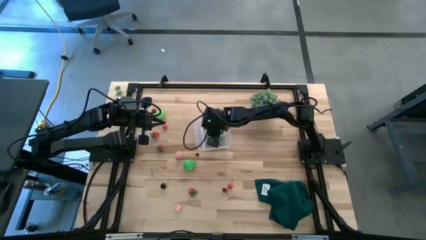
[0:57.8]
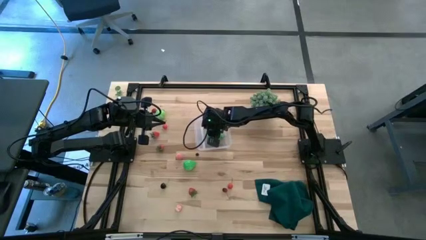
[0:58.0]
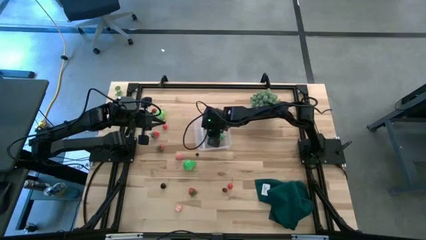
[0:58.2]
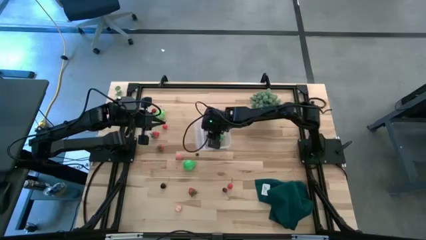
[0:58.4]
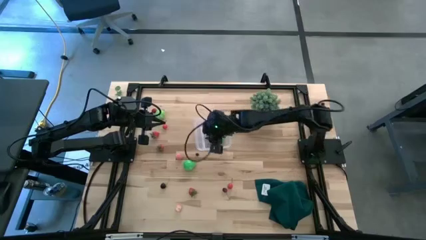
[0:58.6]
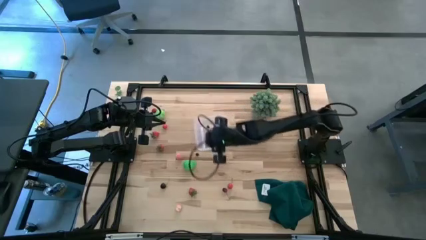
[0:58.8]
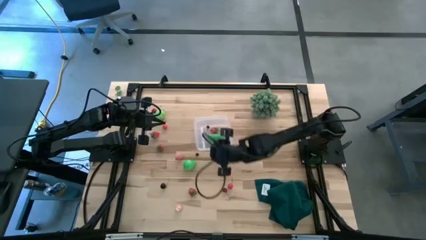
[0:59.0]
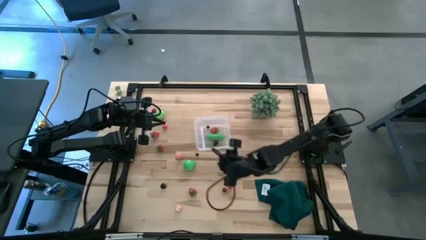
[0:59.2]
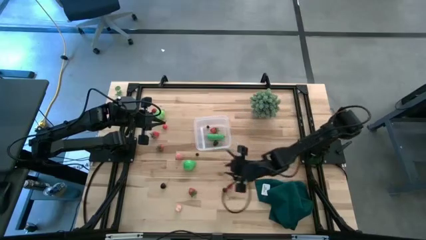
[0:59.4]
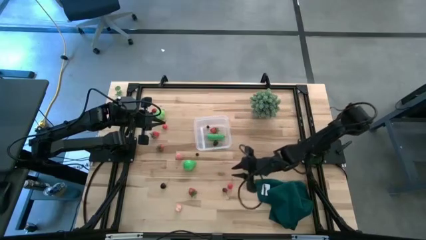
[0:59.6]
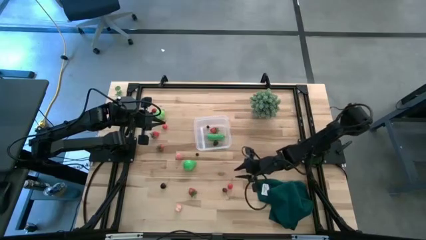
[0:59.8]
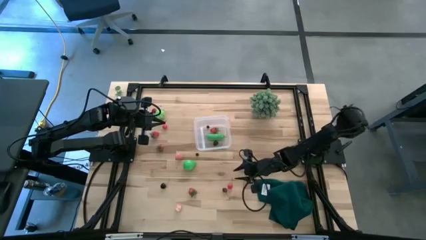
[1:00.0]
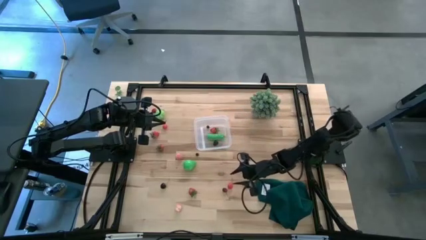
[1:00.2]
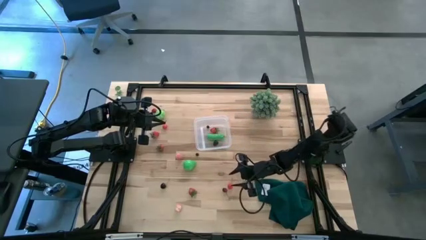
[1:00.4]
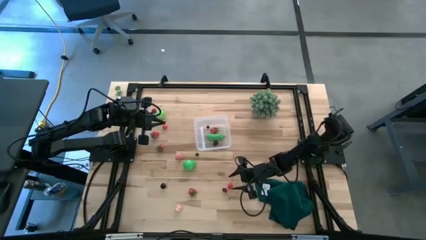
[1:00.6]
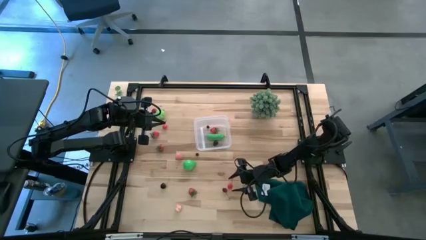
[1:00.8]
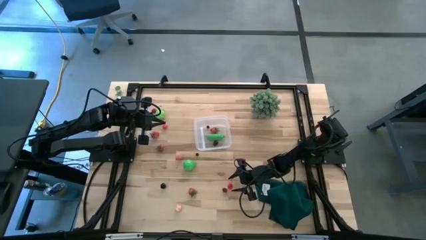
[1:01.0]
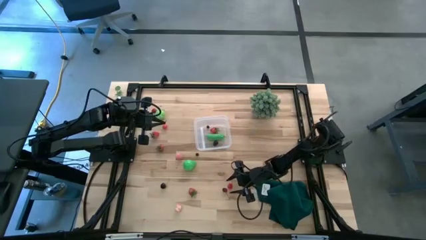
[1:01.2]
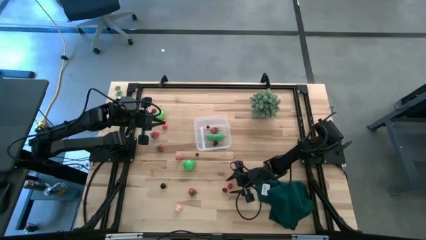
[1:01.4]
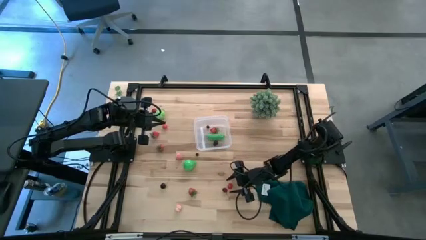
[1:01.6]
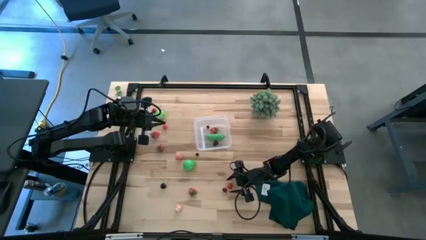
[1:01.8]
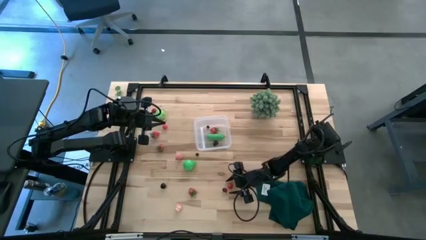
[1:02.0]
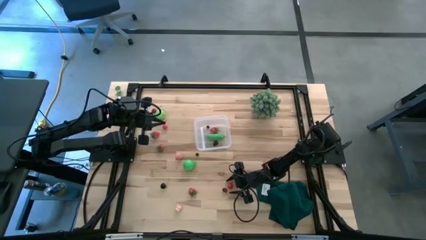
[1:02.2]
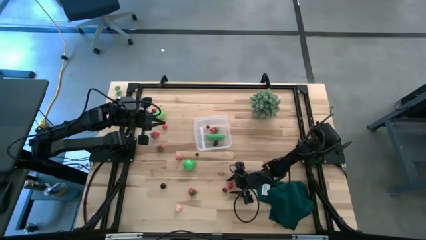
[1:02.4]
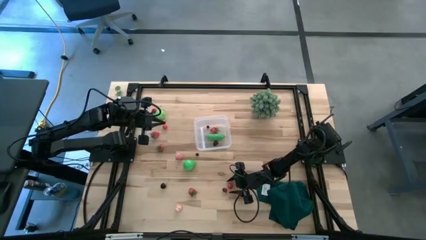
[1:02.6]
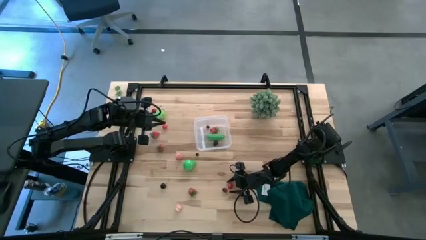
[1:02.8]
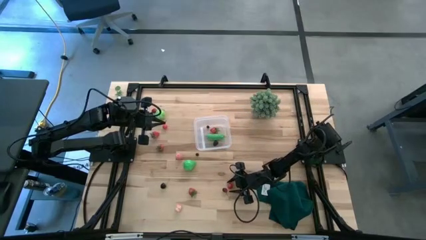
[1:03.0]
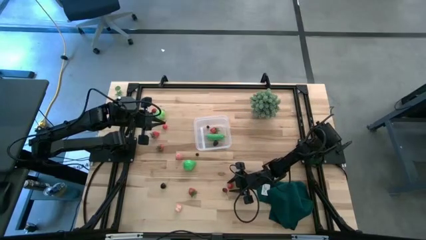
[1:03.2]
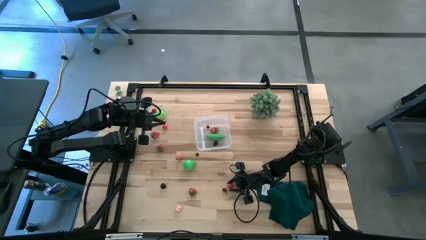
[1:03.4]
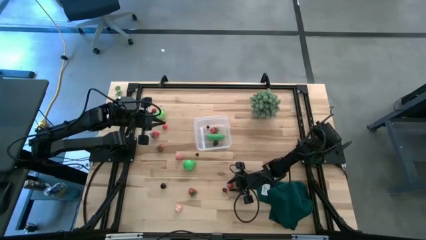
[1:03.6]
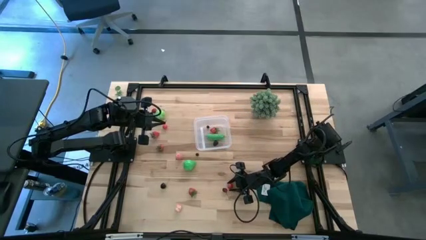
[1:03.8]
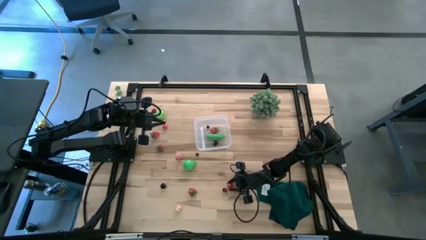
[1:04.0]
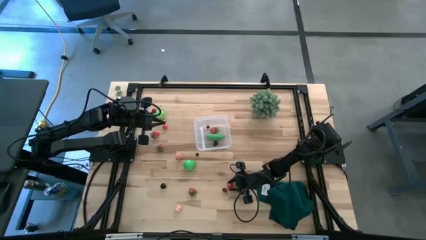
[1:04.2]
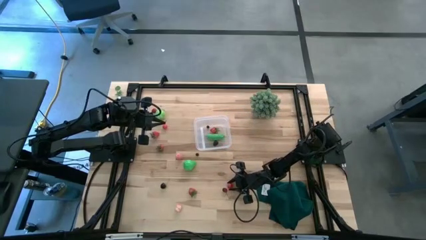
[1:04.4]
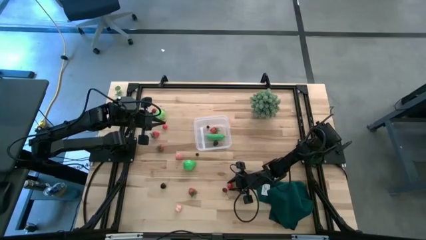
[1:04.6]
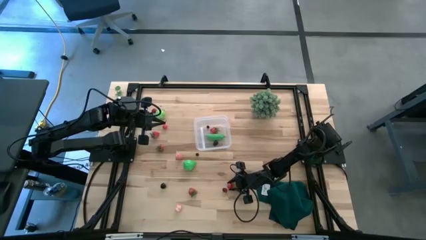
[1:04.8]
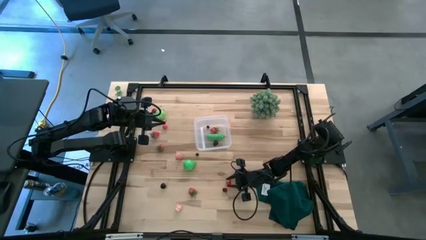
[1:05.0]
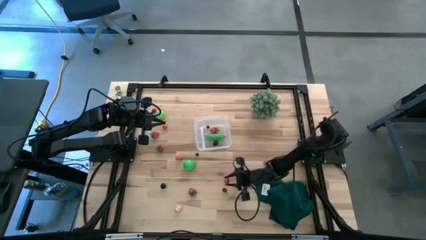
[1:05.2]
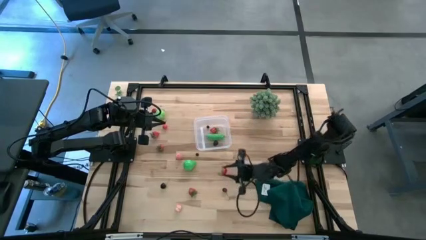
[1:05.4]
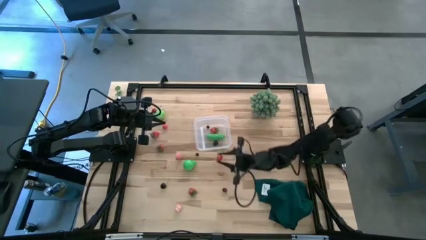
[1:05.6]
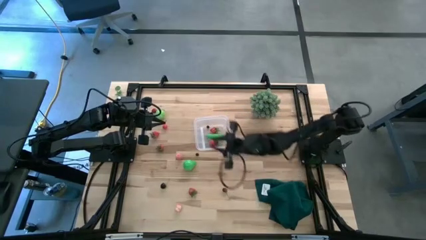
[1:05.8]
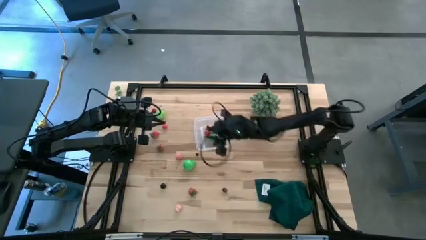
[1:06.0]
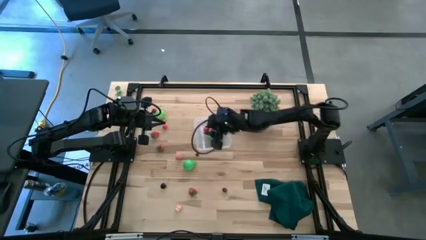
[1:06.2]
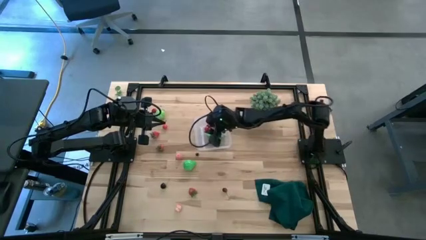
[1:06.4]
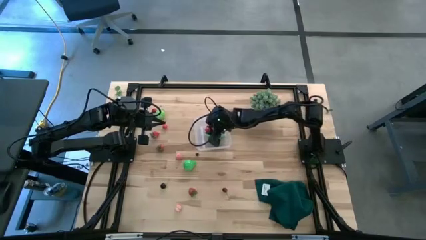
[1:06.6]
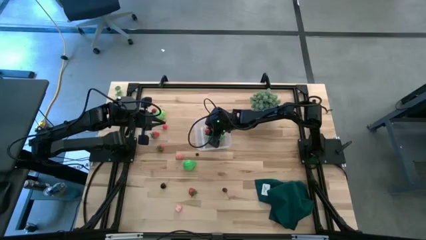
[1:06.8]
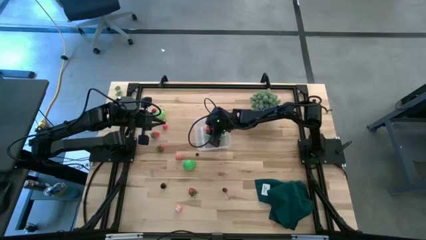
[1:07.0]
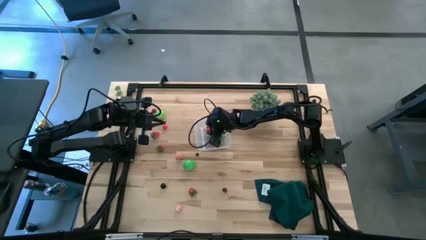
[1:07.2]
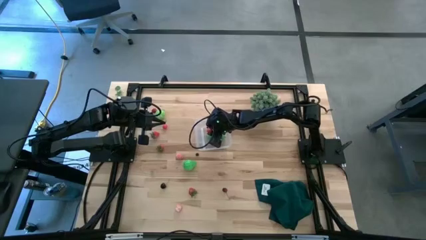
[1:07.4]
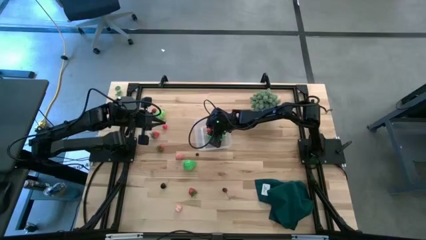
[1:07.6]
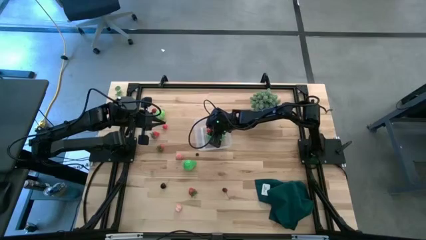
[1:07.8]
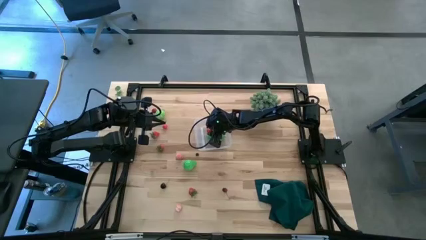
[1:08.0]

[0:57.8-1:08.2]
Task: Pick and placing Produce into tupperware
Put the cherry into the transparent bin

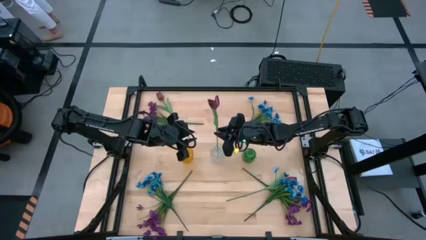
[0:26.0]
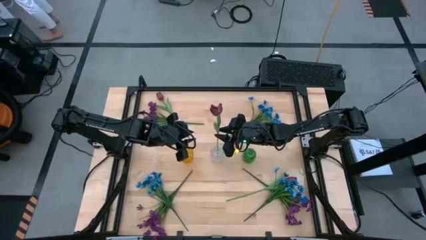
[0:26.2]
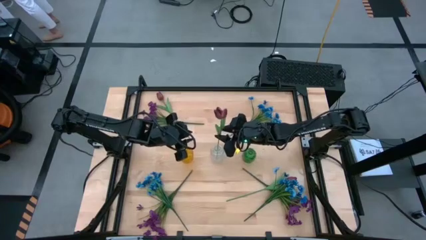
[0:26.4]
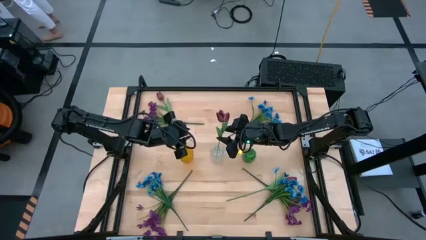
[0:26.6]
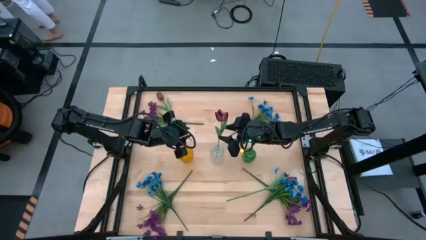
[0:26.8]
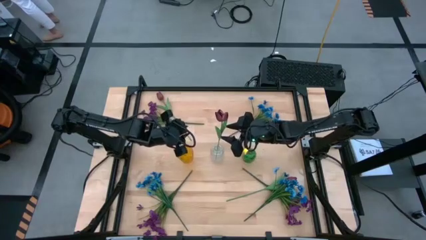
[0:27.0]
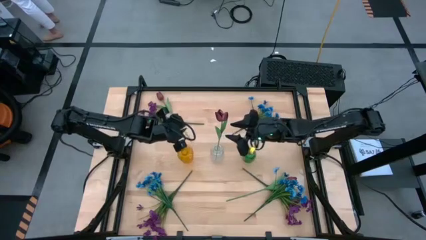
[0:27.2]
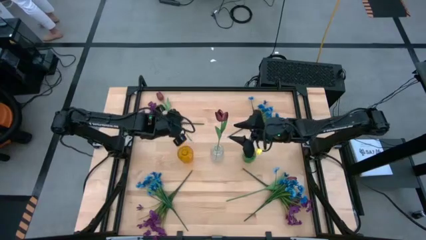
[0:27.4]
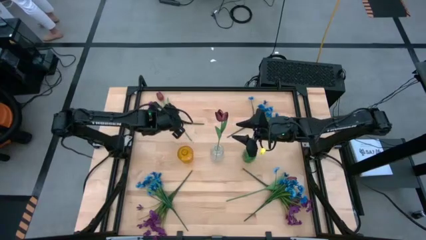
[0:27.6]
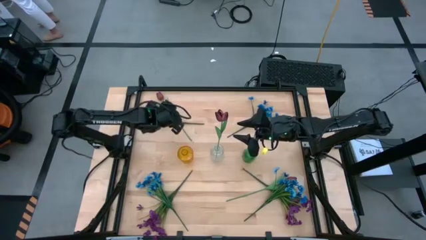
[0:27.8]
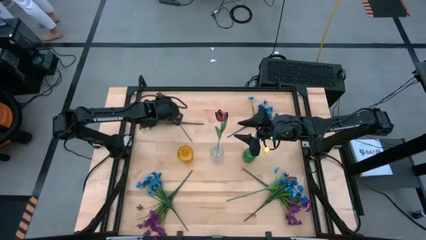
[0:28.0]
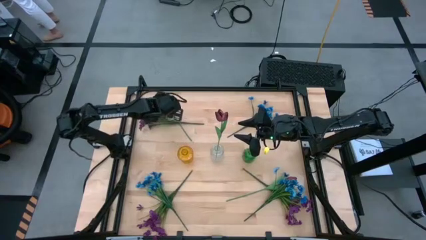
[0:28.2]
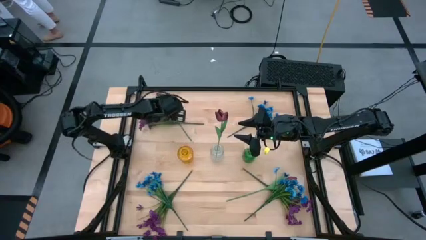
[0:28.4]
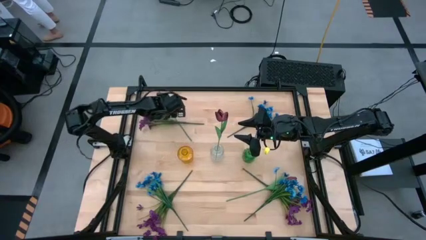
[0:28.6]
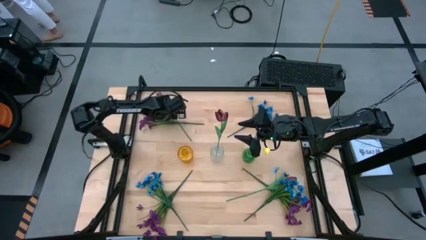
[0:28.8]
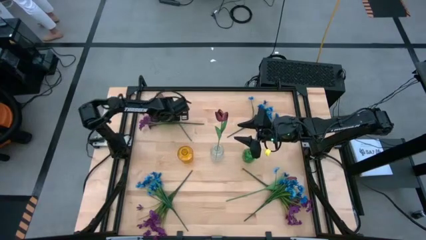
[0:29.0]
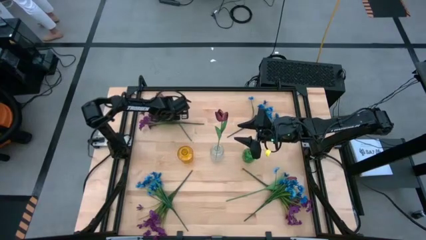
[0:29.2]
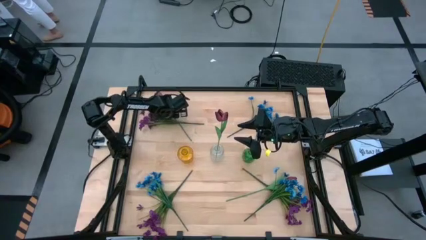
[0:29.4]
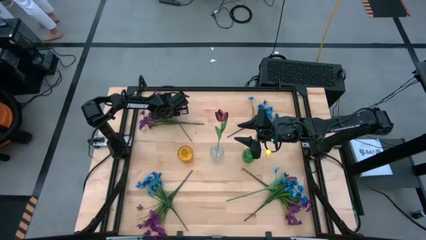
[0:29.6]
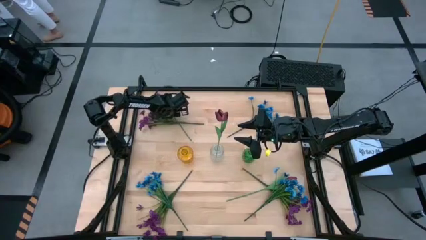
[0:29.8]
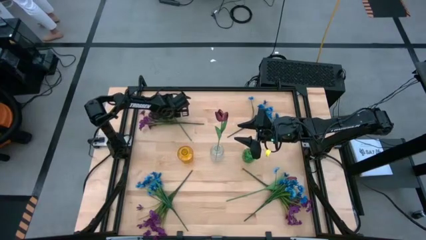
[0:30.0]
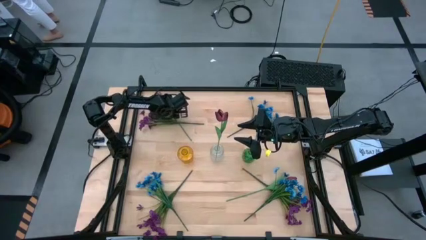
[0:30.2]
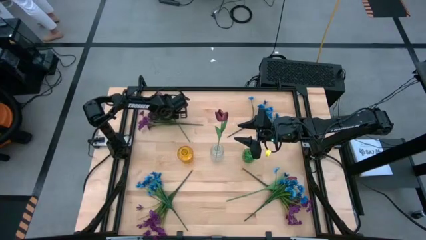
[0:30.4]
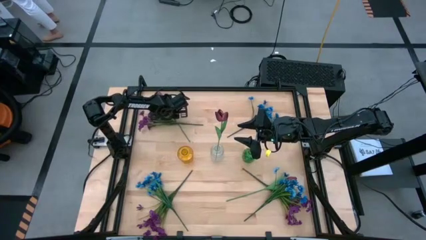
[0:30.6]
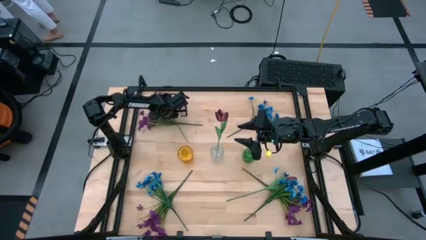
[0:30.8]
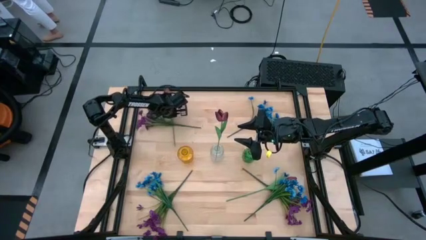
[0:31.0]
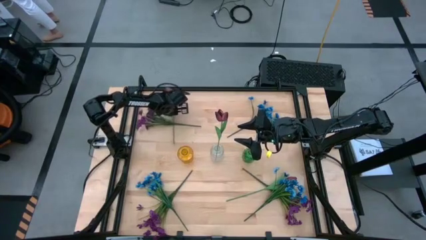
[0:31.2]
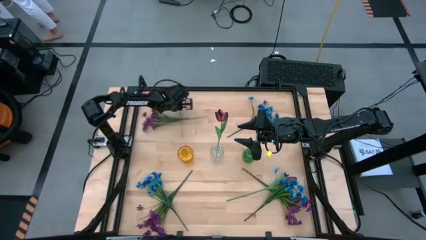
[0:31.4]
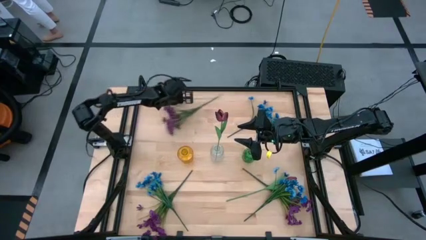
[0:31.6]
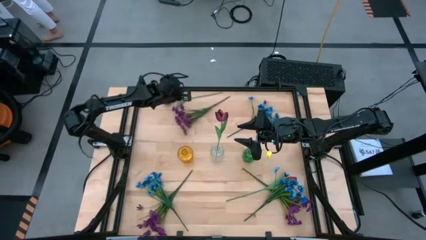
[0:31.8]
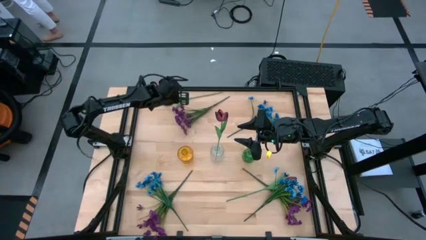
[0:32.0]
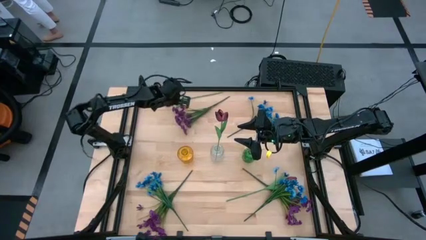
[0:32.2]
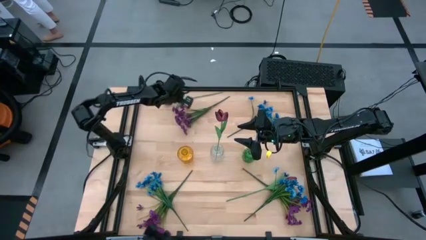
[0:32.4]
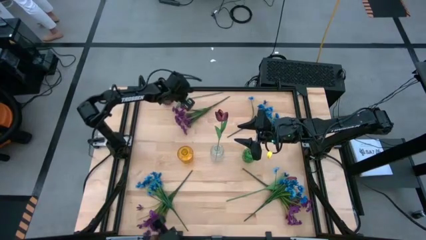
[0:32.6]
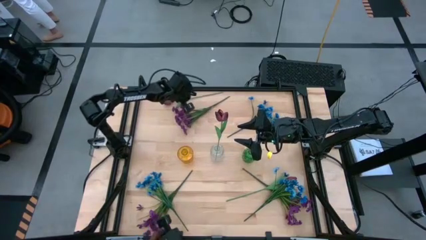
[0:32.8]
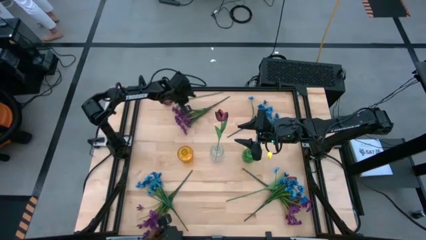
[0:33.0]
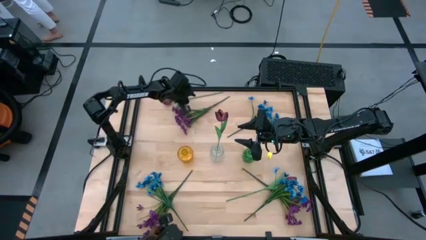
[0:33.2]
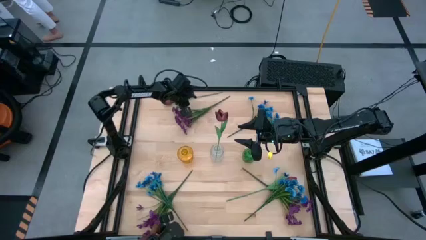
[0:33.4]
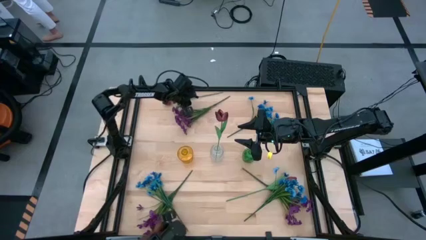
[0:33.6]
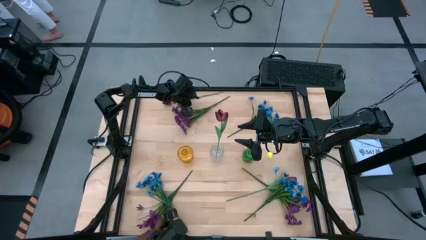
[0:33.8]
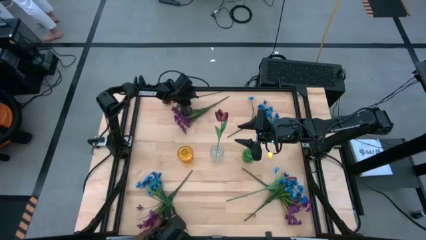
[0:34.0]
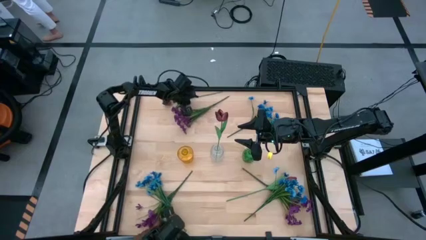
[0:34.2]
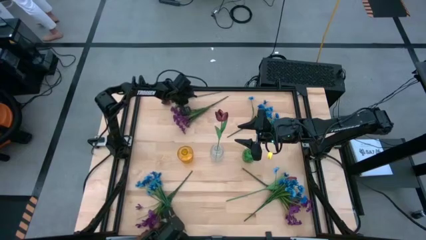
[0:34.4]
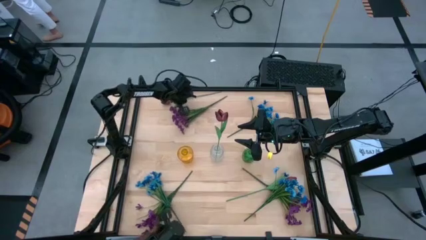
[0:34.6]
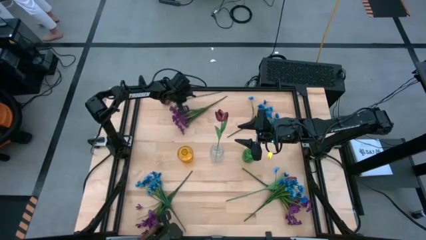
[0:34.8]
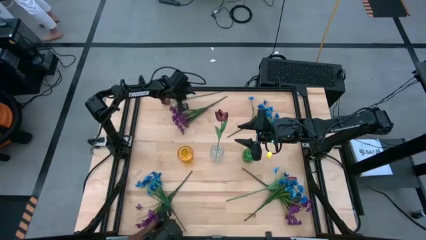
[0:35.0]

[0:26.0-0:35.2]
Task: Sort flowers into vase by color
Put the top red tulip into the transparent vase
